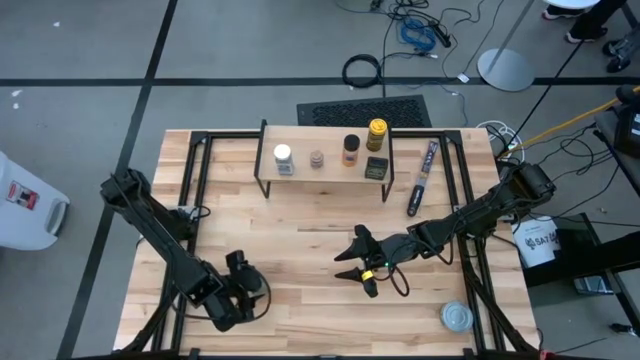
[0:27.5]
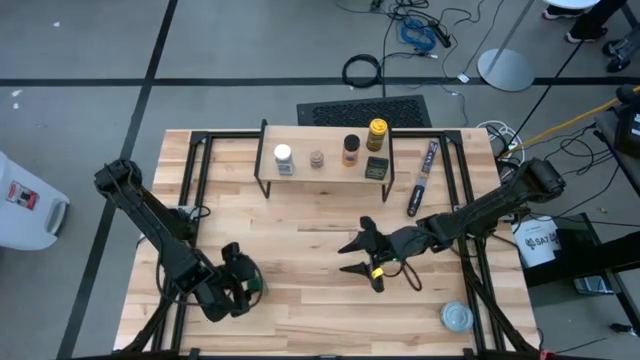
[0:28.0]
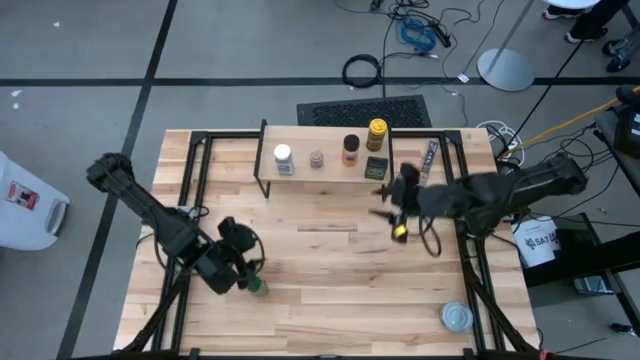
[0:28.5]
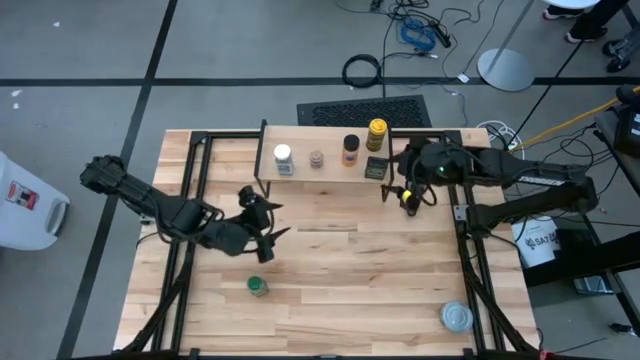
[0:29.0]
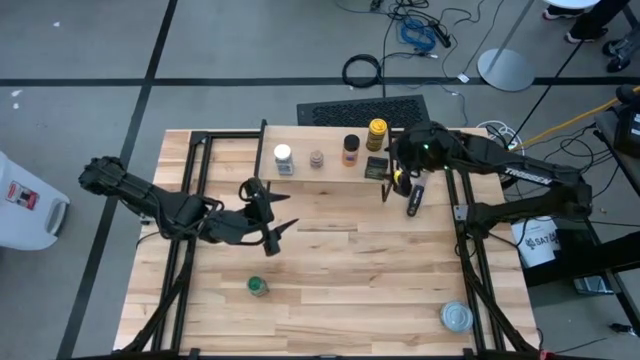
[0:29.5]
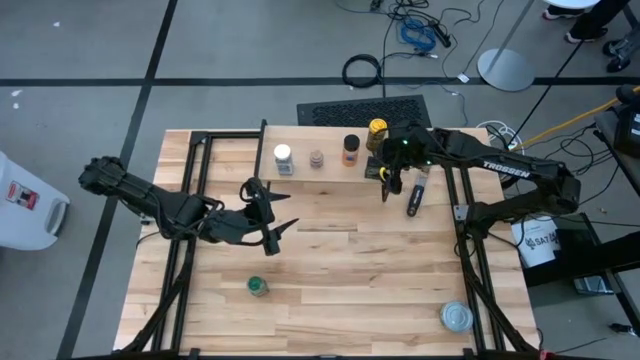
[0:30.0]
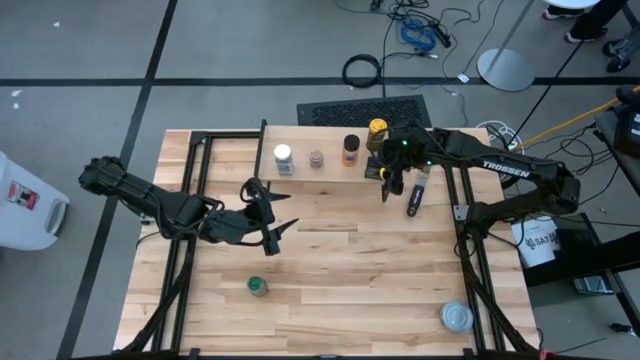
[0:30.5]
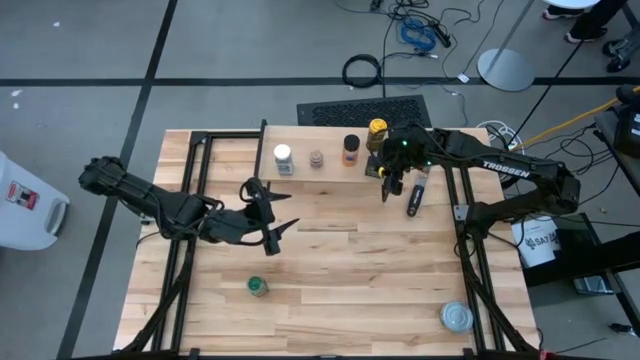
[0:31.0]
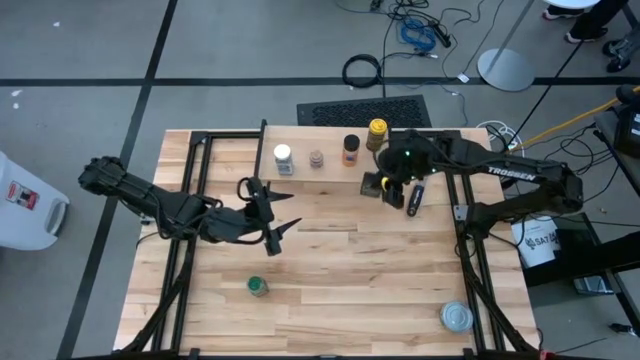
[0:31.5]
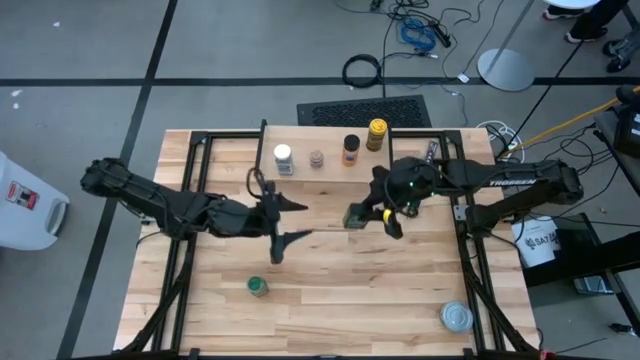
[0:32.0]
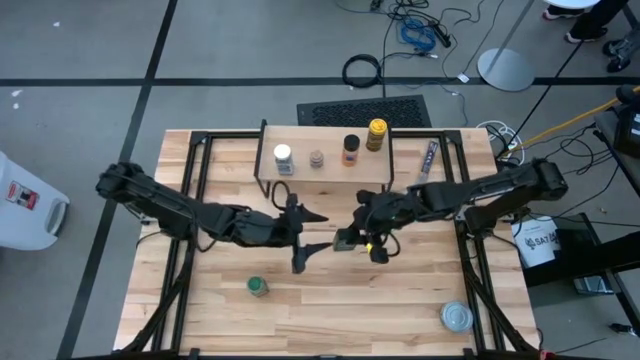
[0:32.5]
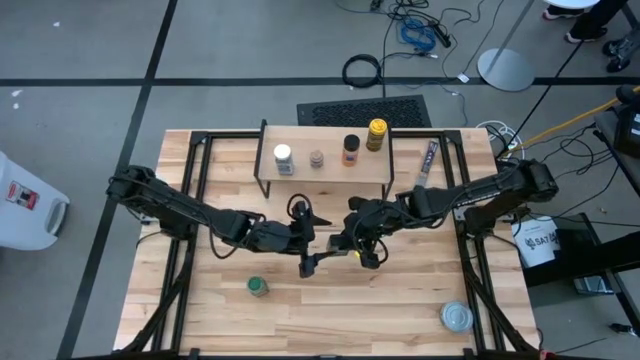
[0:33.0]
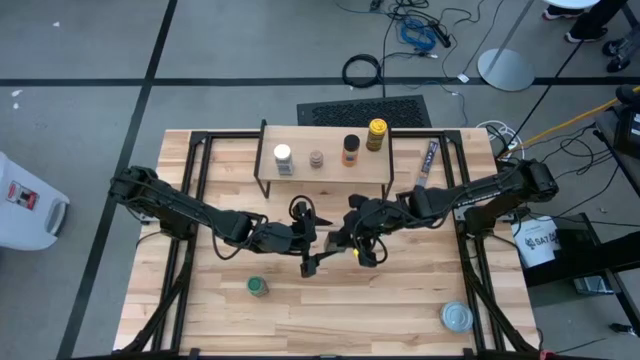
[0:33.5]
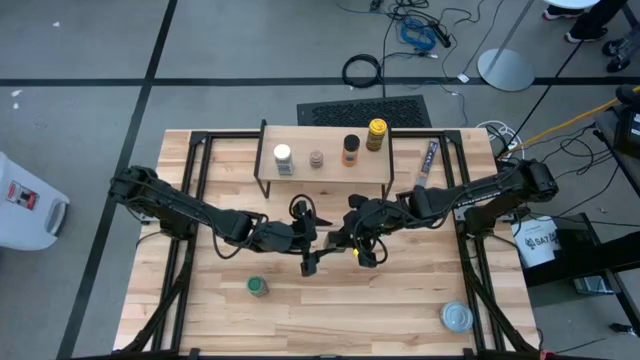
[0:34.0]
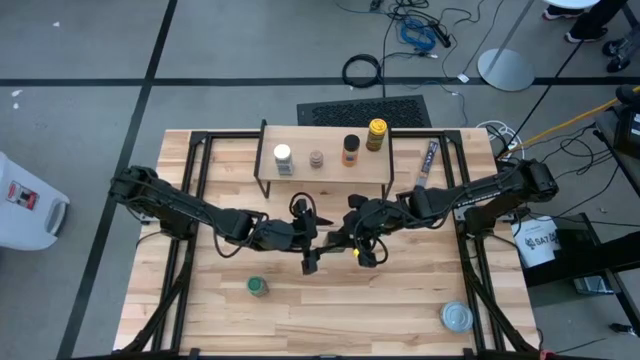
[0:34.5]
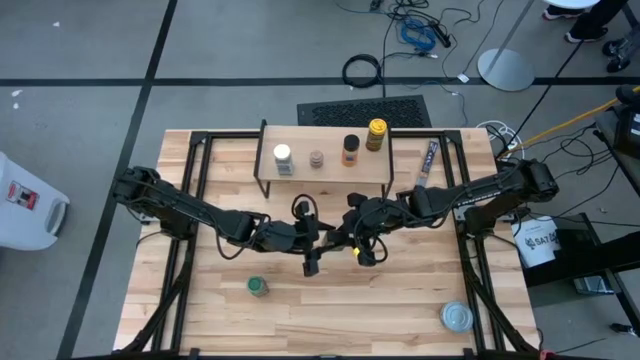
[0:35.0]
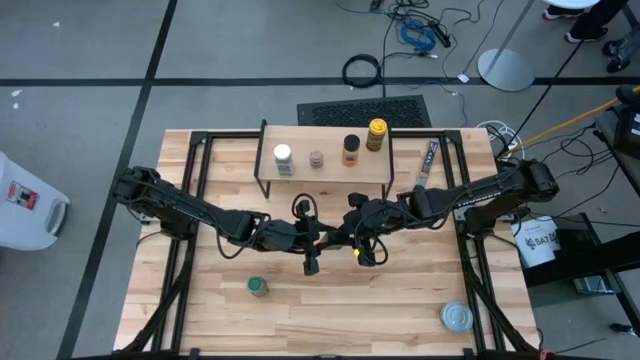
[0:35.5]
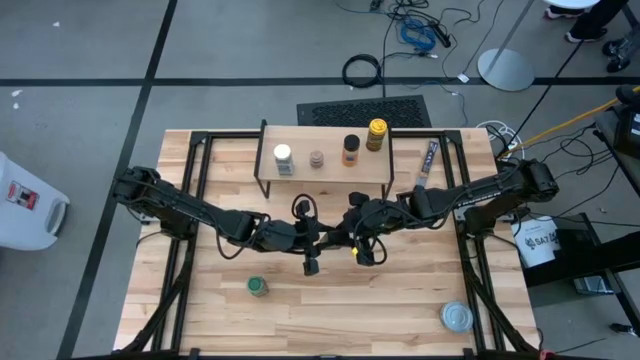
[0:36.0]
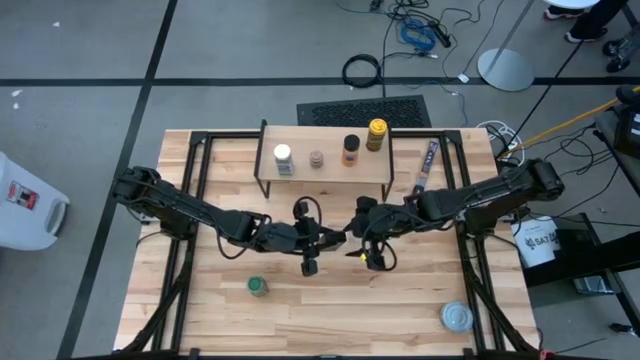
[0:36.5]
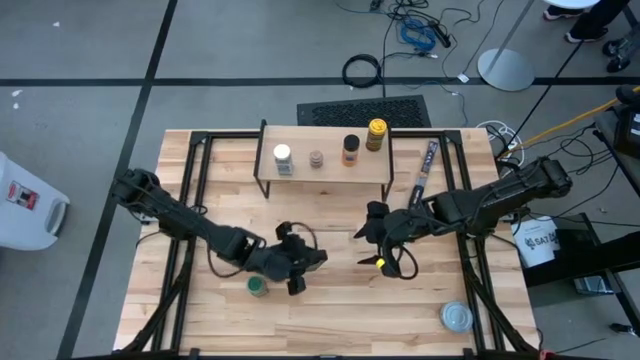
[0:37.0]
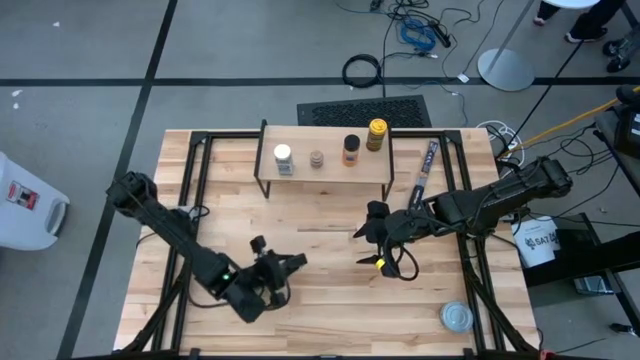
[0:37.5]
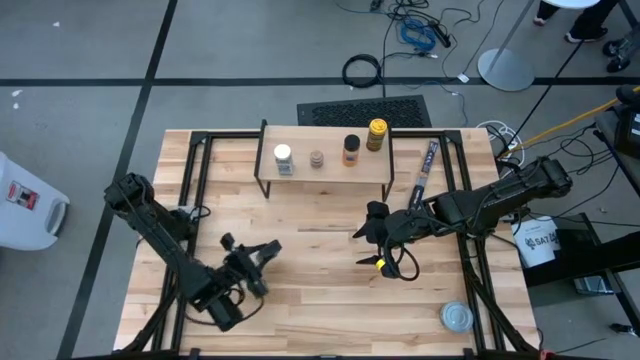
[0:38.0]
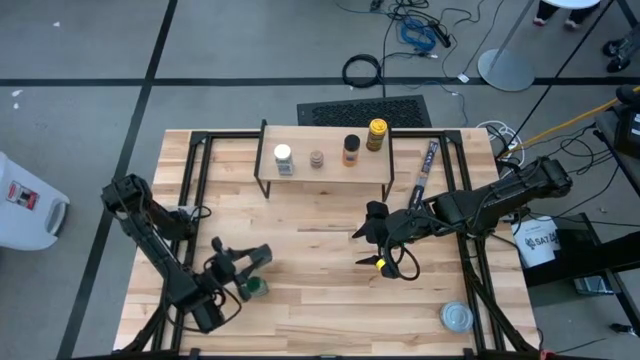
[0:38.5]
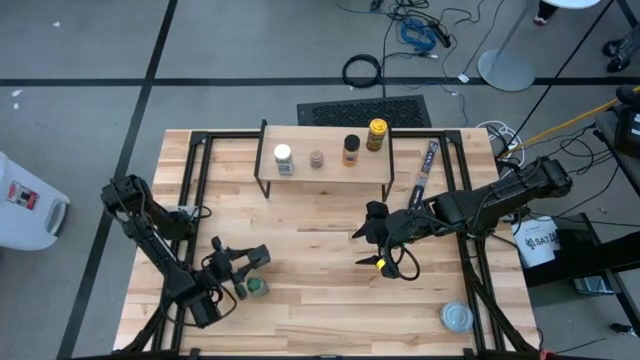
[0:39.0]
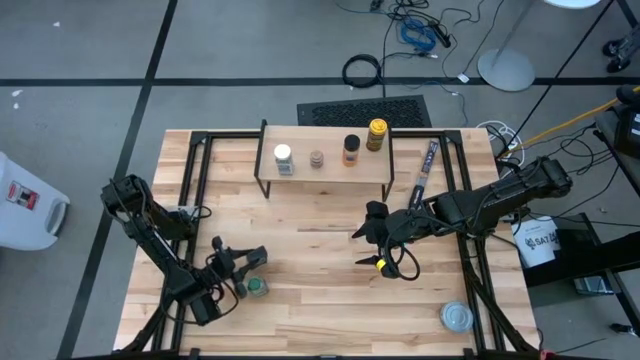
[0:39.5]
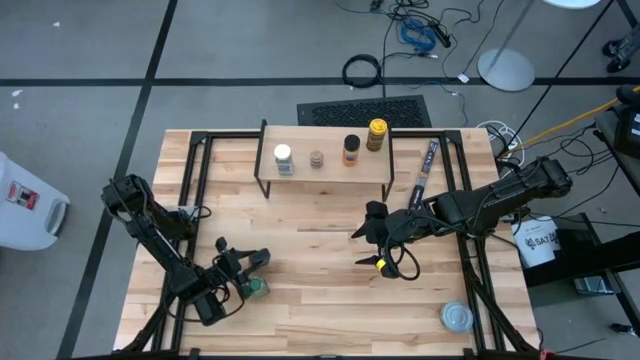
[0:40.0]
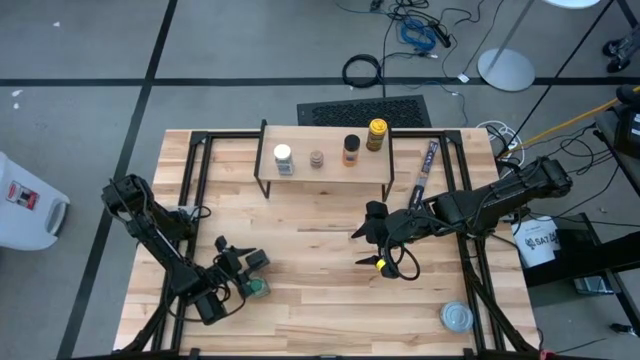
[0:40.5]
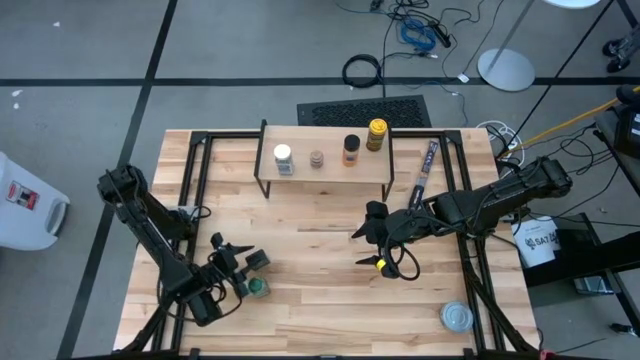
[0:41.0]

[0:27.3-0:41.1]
Task: Shelf spices
Remove the rectangular black seasoning bottle from the shelf

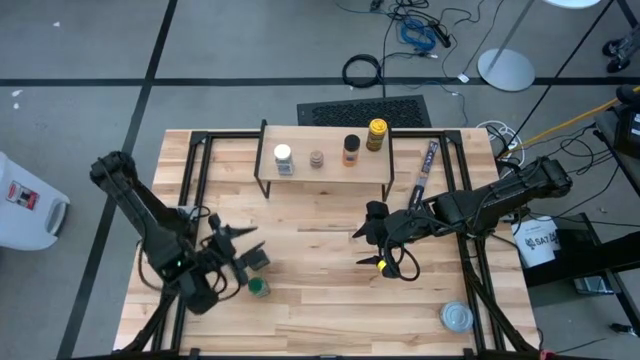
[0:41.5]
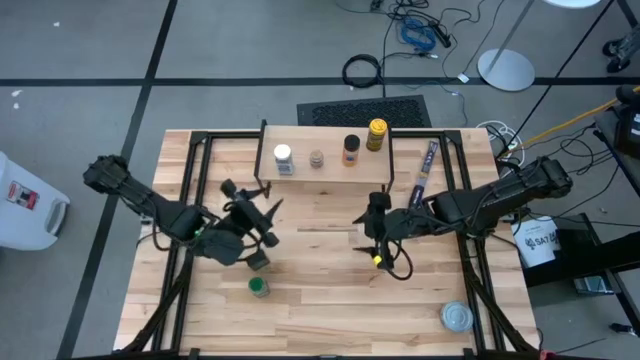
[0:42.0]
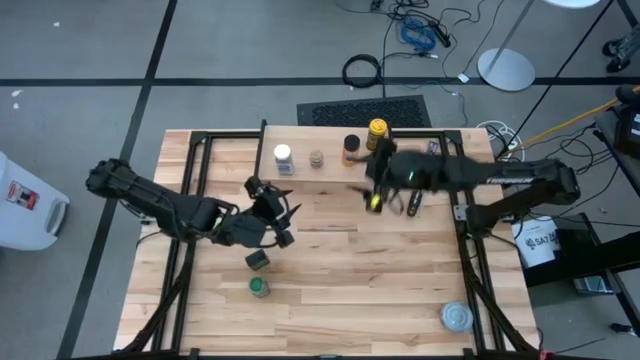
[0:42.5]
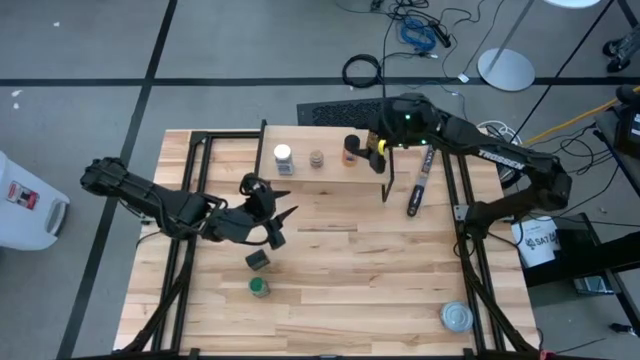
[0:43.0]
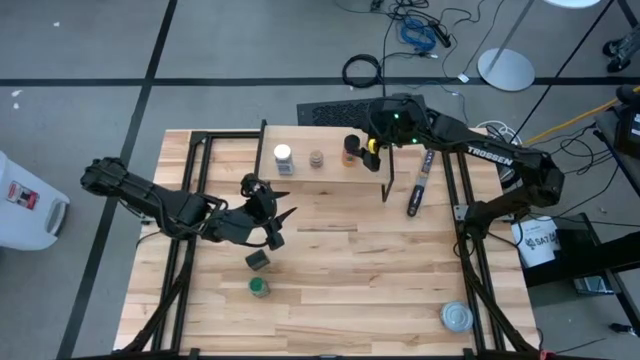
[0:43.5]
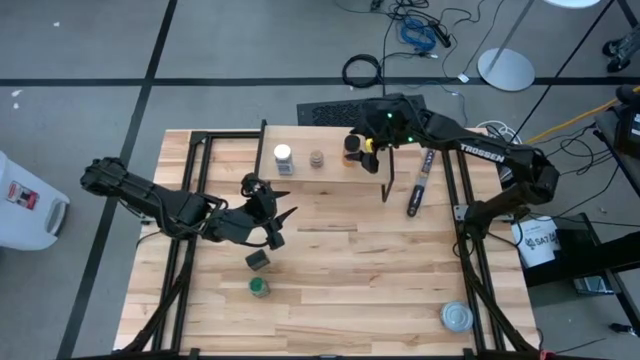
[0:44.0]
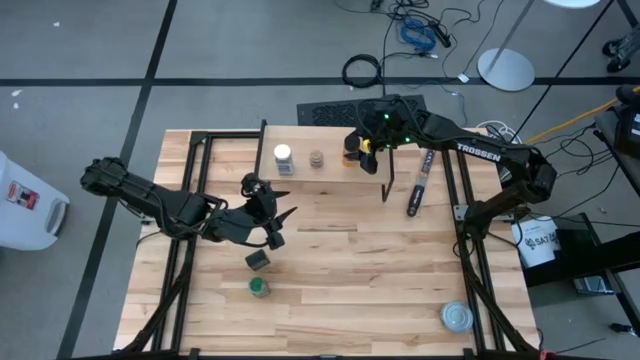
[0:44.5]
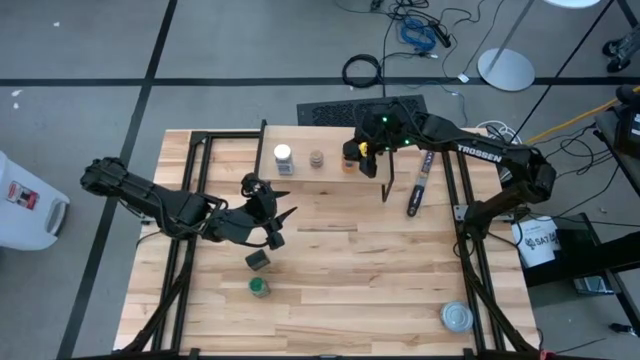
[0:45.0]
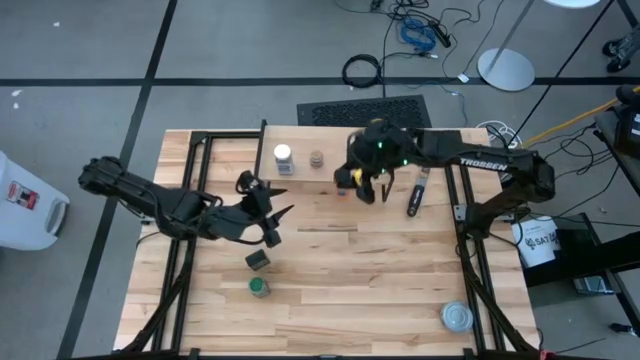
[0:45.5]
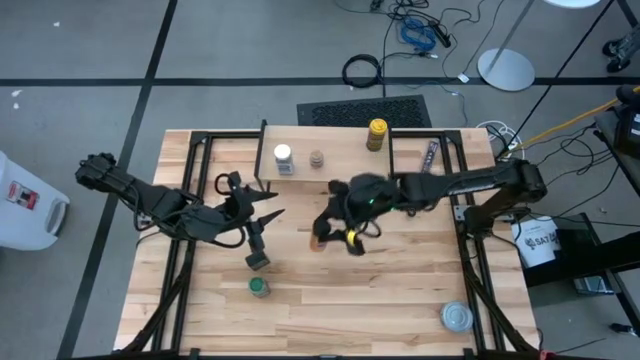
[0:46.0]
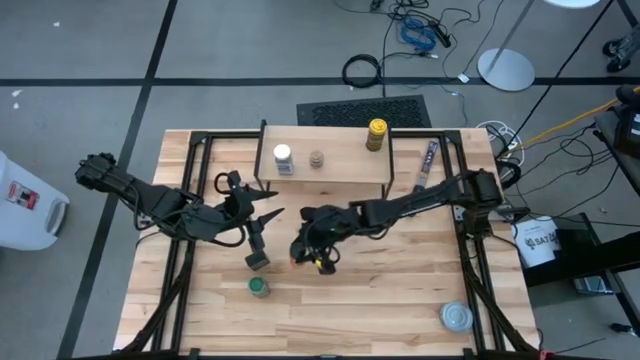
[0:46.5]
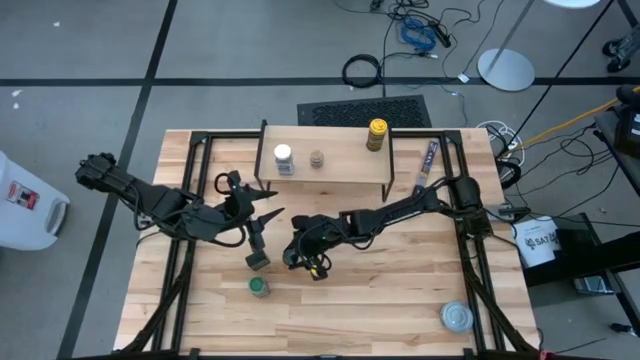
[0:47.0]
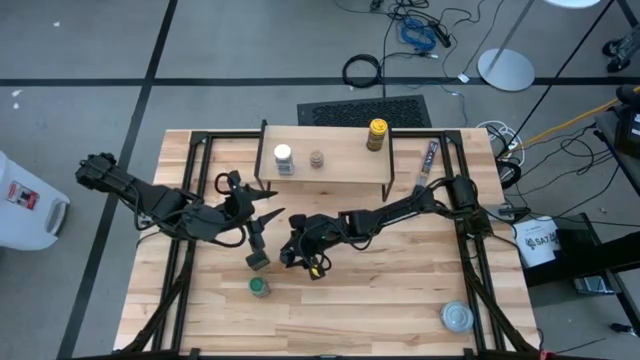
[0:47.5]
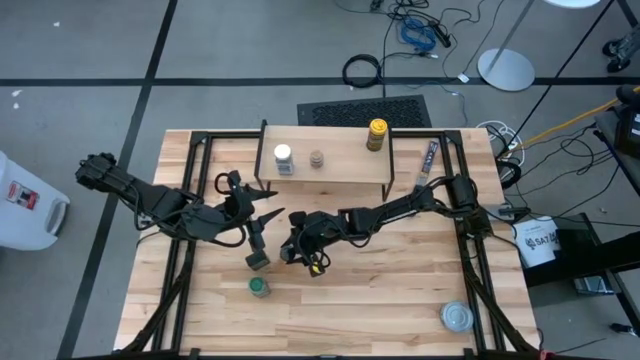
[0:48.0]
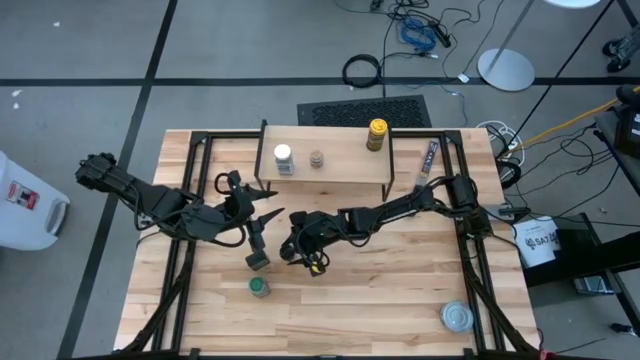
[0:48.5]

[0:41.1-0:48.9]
Remove the black seasoning bottle from the shelf and put it beside the rectangular black seasoning bottle

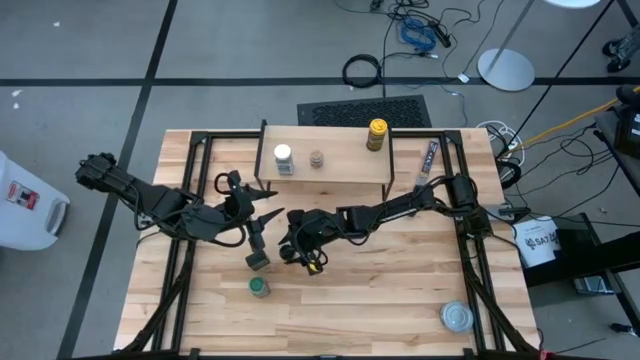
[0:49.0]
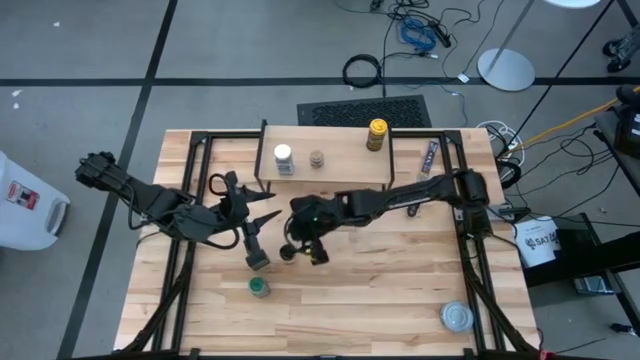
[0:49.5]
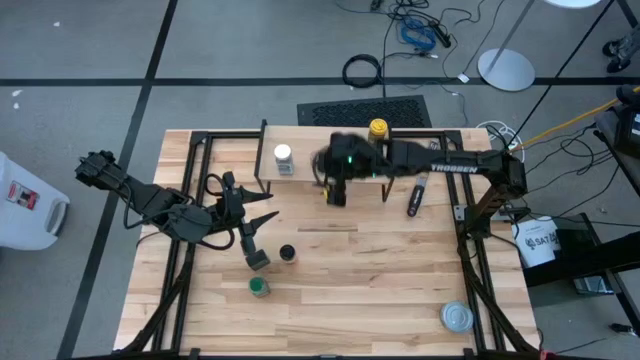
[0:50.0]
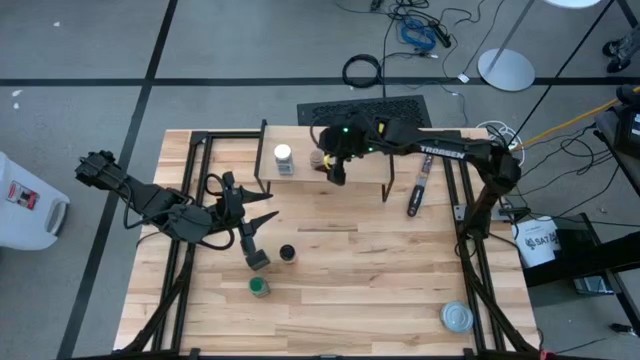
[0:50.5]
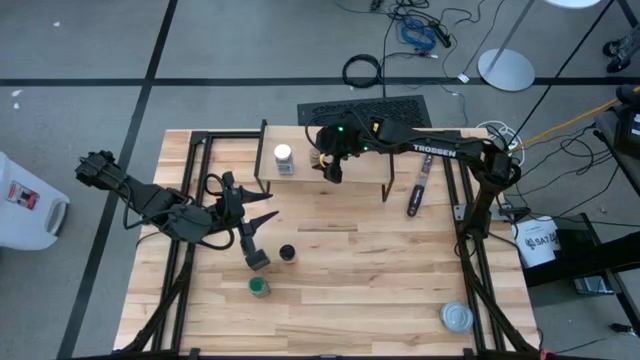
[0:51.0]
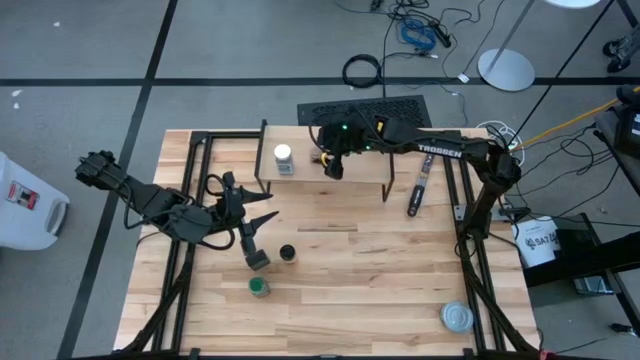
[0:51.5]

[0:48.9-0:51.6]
Remove the light brown seasoning bottle from the shelf
